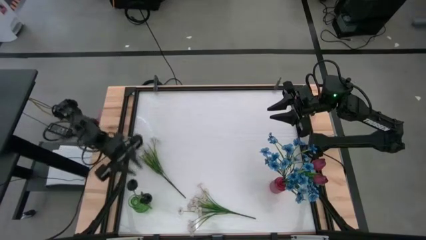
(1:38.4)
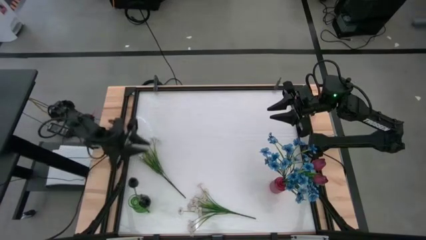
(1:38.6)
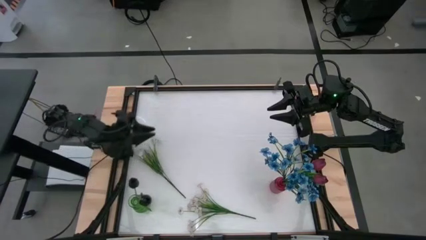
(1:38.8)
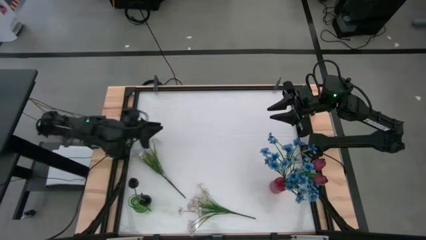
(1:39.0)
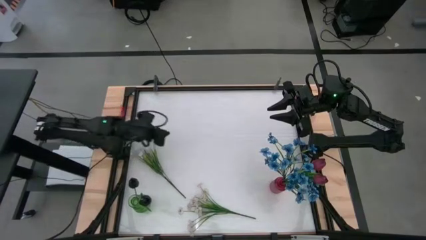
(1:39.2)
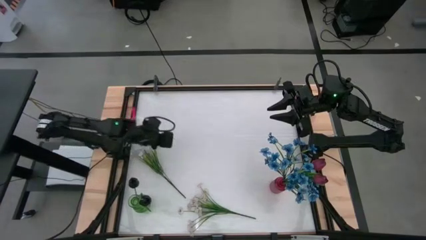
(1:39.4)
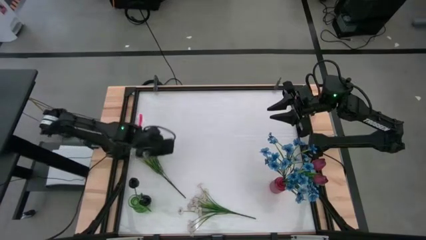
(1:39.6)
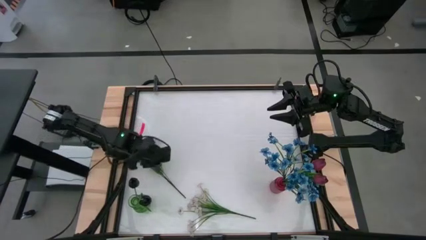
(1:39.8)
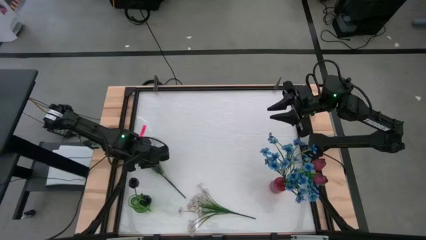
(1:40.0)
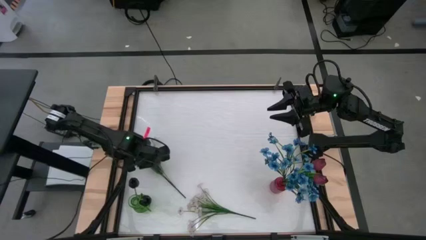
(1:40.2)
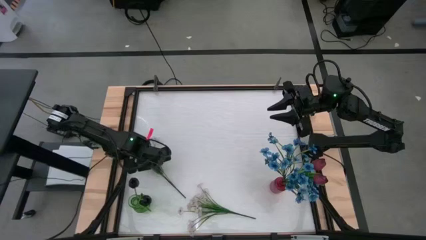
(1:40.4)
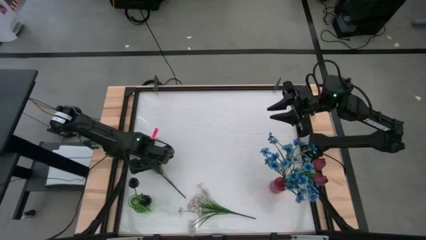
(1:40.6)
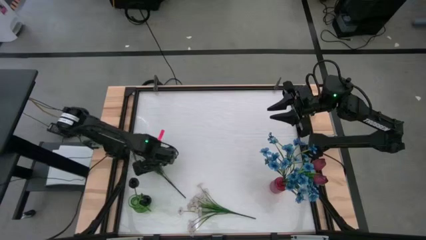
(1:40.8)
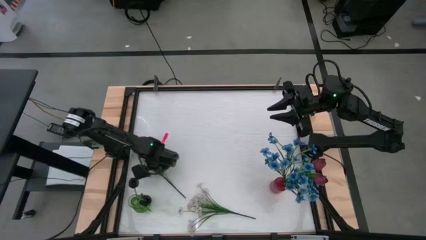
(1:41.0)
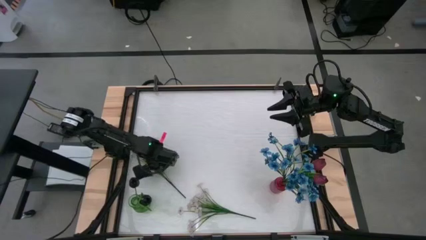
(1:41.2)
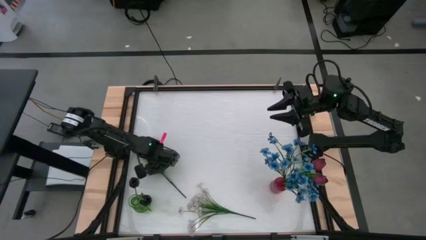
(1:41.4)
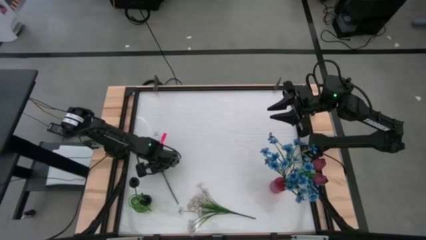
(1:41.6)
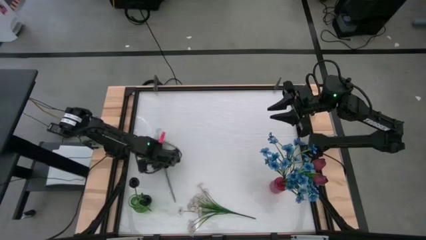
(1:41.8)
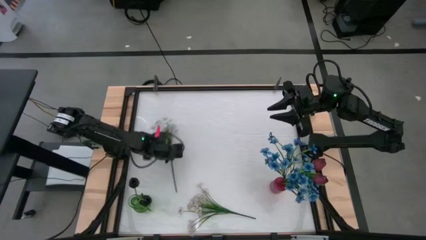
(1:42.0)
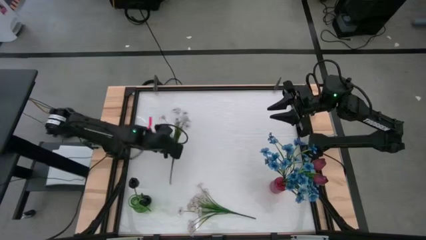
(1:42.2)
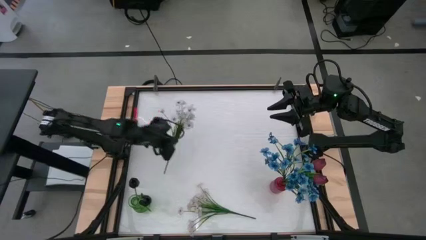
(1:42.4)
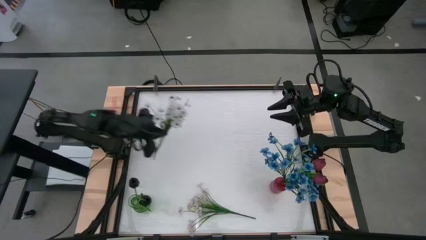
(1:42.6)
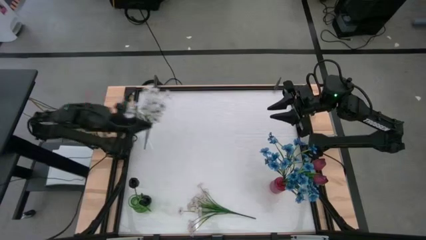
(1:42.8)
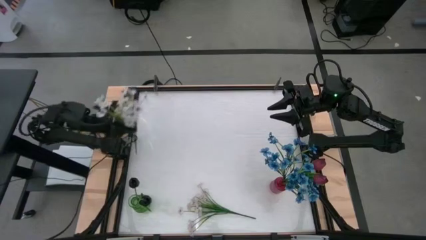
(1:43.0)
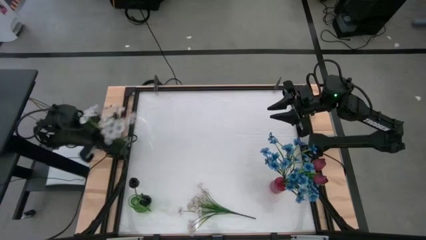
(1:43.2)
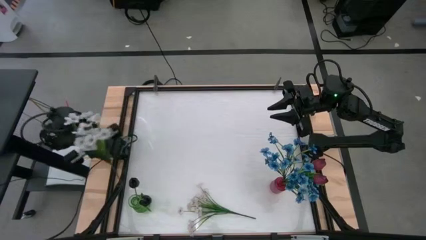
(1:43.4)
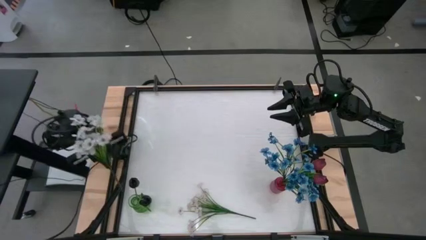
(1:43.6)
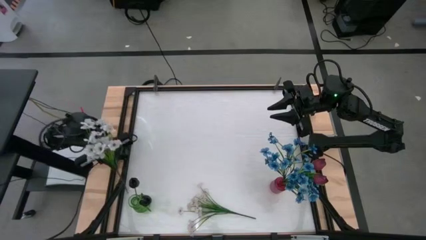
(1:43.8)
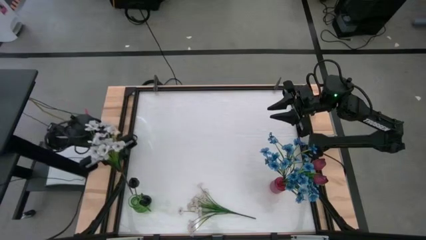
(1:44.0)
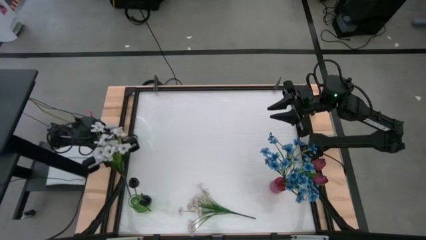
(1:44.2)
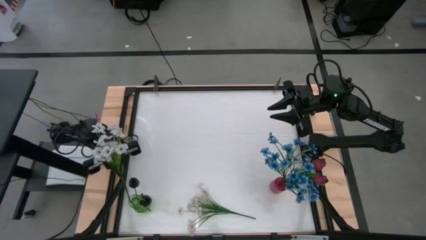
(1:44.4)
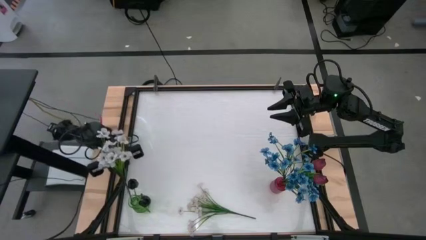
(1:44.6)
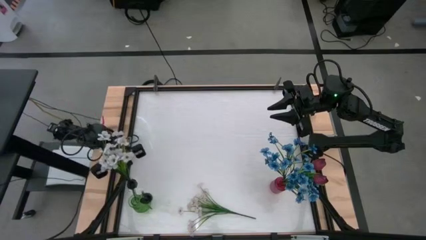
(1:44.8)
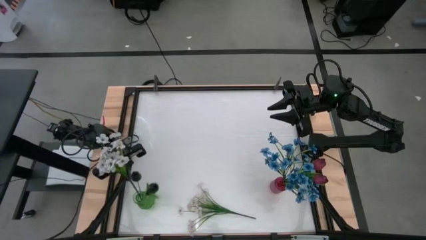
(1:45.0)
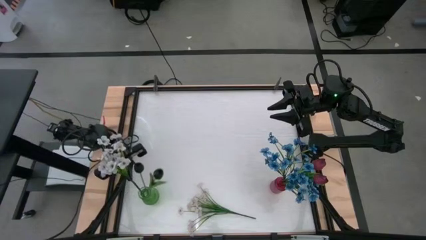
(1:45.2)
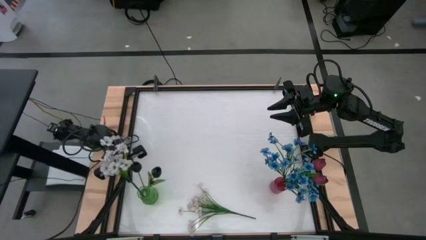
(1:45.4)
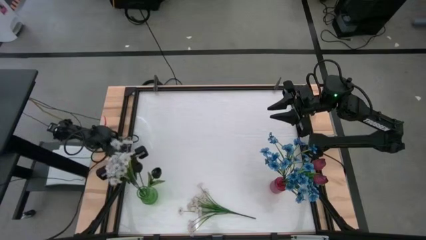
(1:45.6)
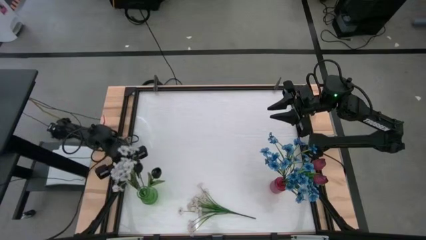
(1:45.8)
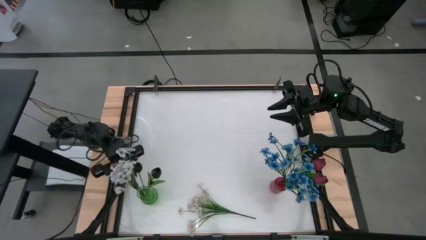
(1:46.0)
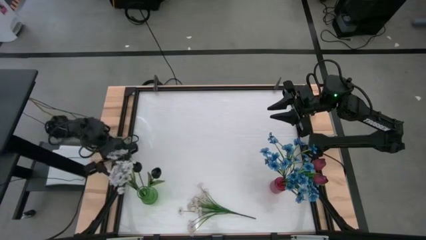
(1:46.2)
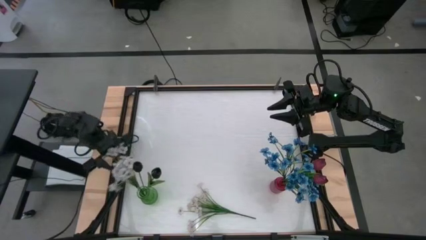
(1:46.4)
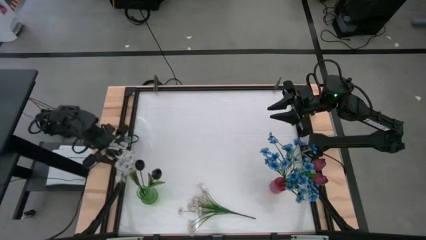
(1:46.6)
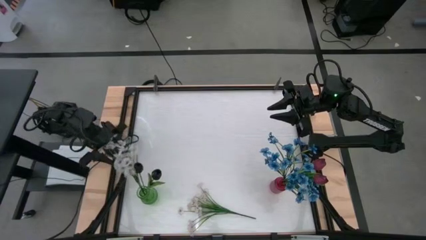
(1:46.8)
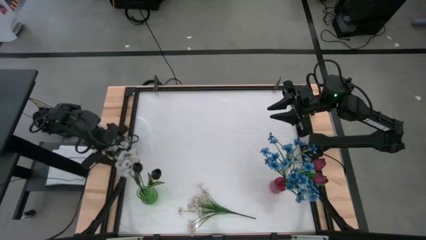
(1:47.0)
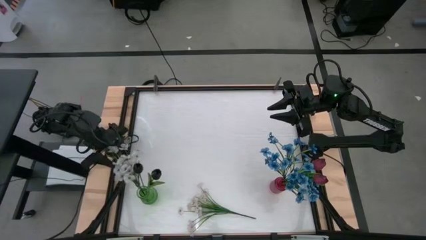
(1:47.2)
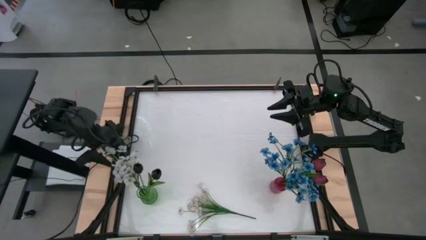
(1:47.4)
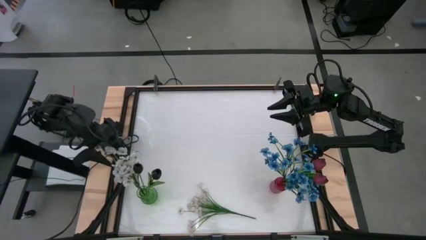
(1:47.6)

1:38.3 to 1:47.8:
Task: Sort flowers into vase by color
Put the left white flowers into the green flower vase

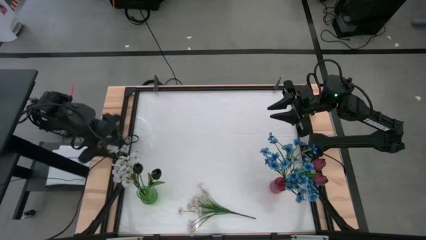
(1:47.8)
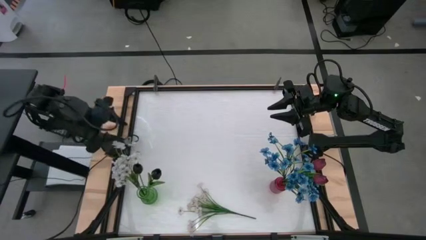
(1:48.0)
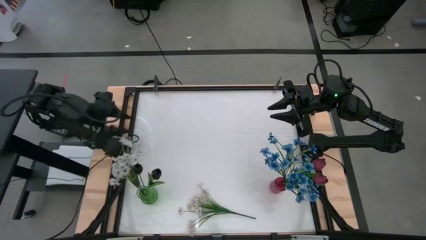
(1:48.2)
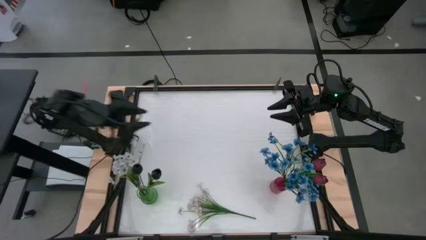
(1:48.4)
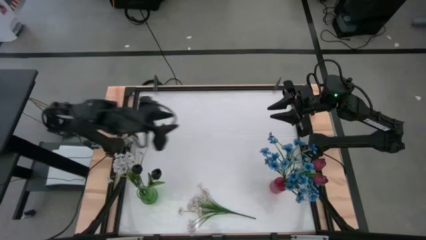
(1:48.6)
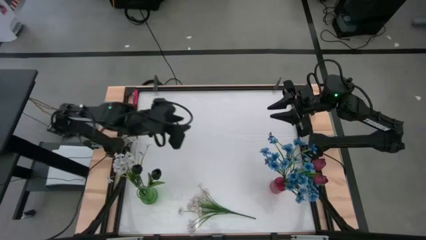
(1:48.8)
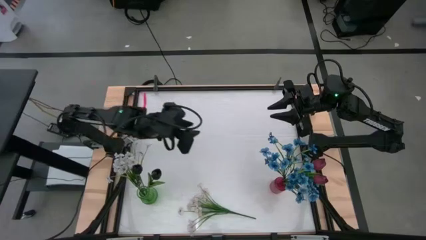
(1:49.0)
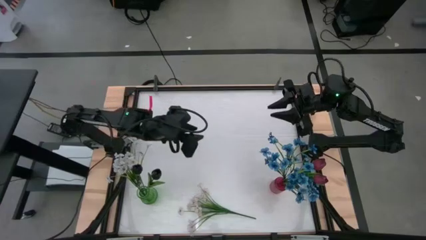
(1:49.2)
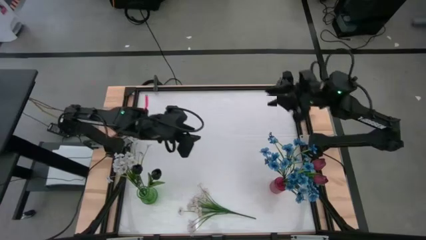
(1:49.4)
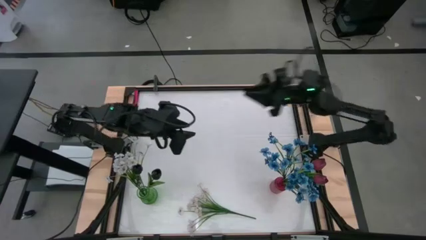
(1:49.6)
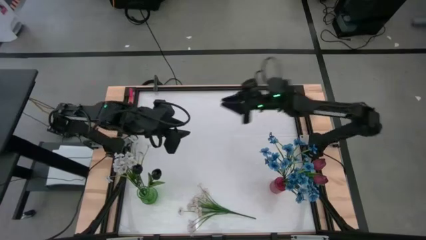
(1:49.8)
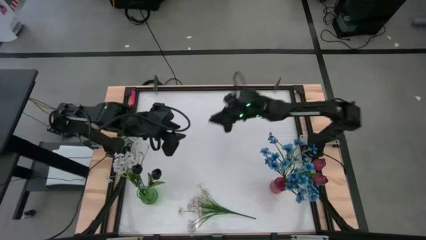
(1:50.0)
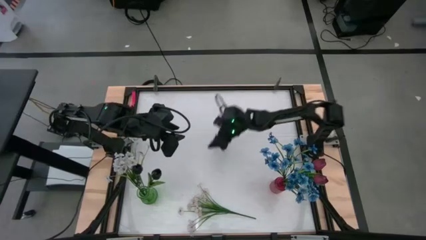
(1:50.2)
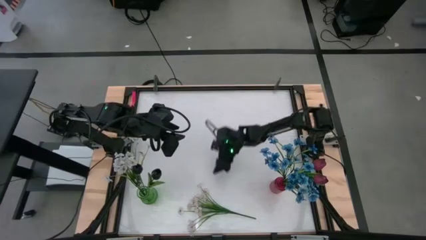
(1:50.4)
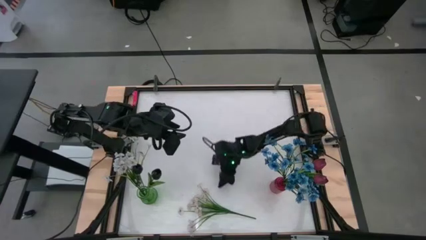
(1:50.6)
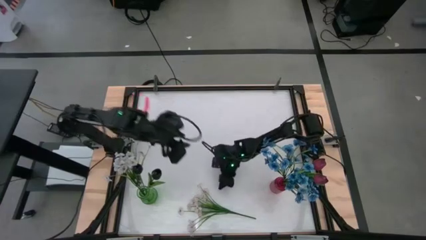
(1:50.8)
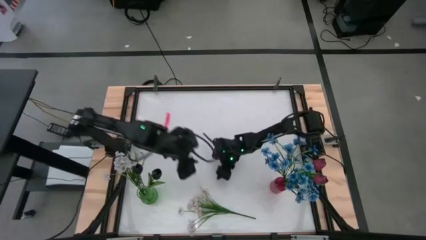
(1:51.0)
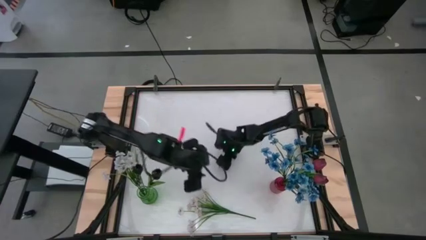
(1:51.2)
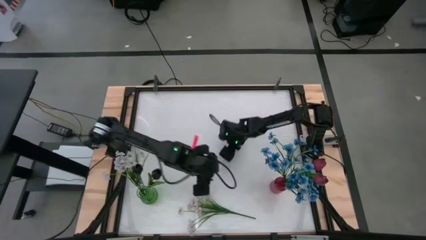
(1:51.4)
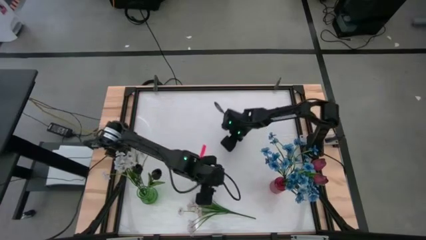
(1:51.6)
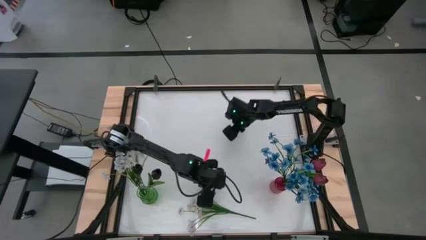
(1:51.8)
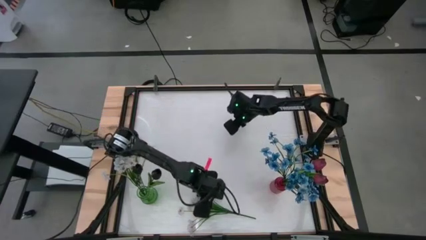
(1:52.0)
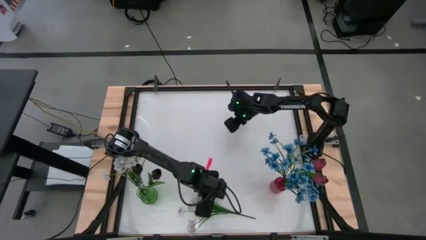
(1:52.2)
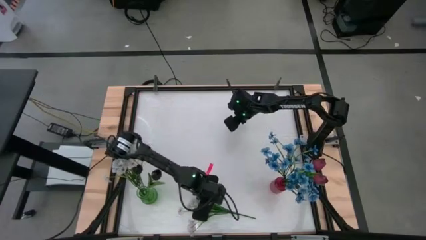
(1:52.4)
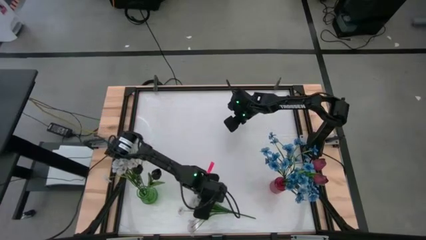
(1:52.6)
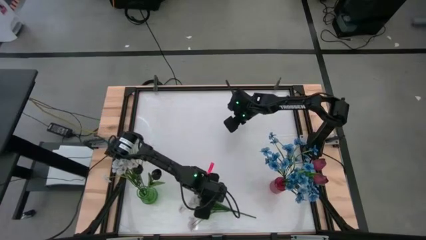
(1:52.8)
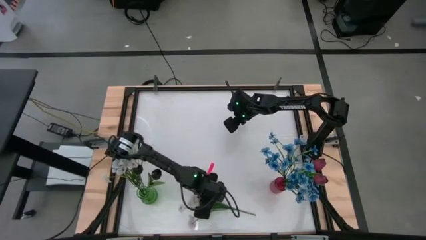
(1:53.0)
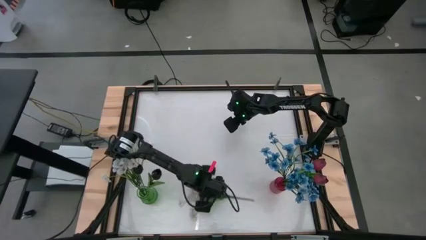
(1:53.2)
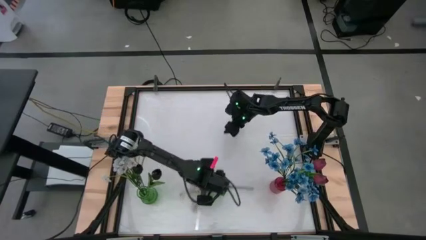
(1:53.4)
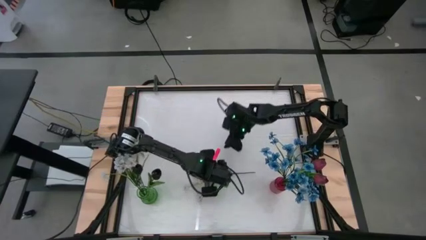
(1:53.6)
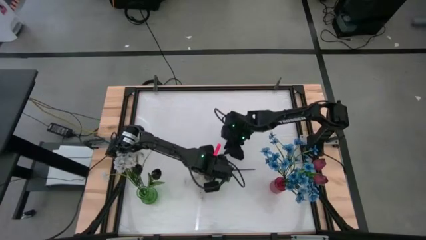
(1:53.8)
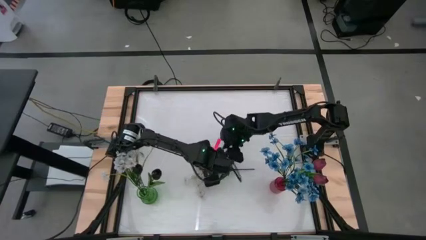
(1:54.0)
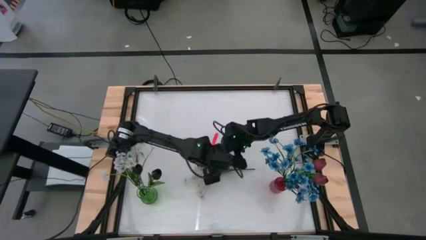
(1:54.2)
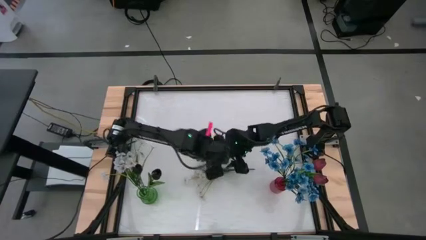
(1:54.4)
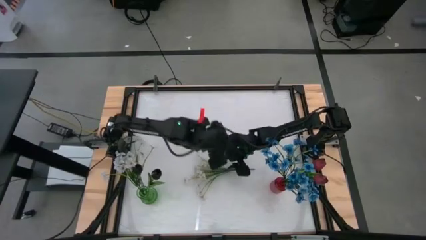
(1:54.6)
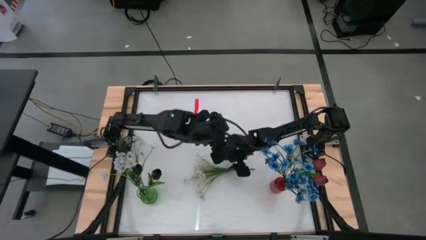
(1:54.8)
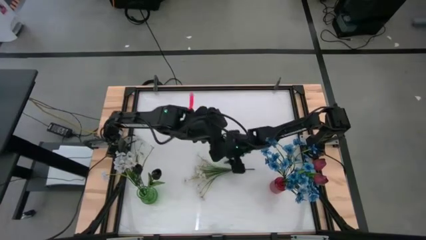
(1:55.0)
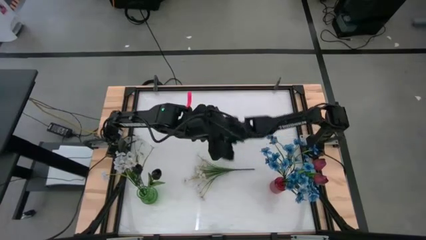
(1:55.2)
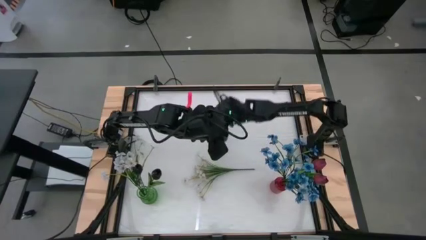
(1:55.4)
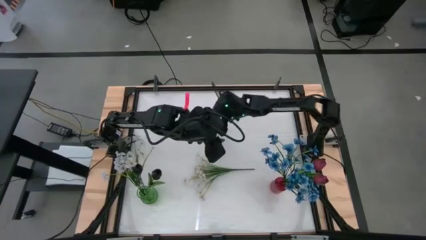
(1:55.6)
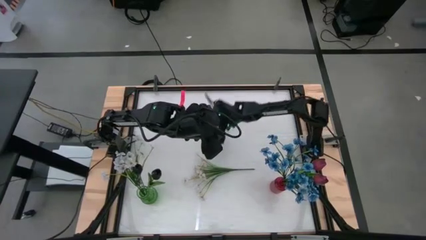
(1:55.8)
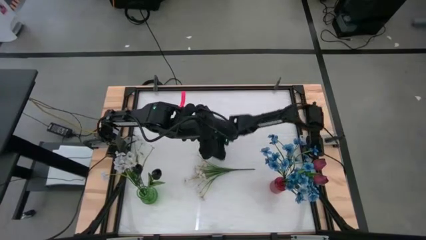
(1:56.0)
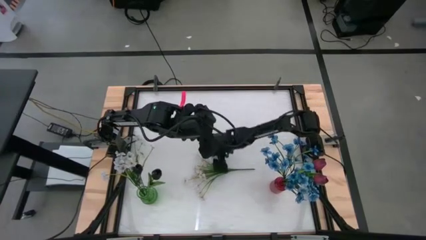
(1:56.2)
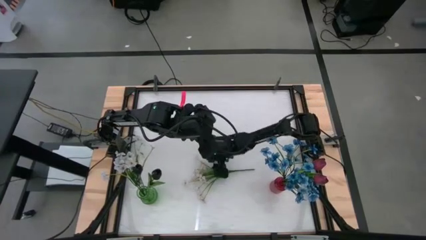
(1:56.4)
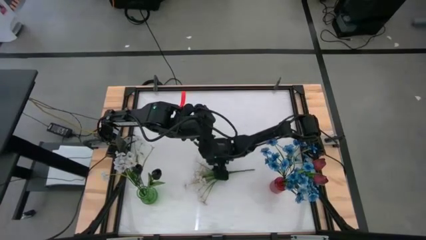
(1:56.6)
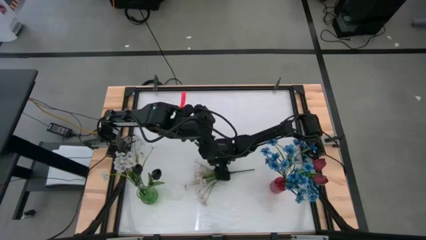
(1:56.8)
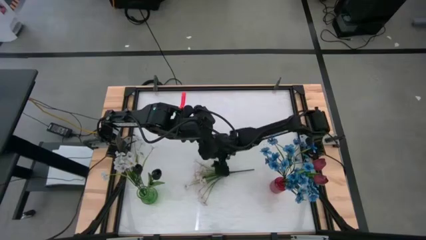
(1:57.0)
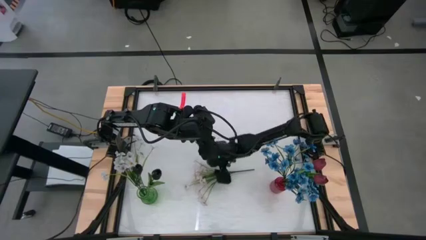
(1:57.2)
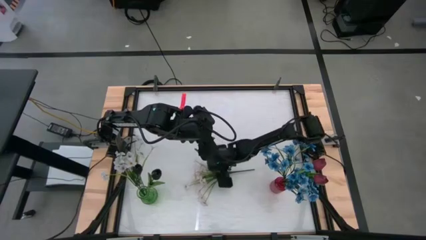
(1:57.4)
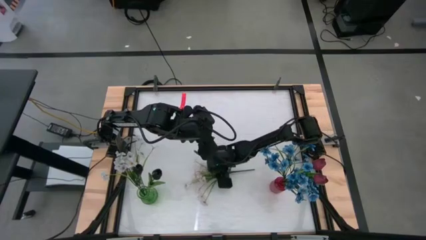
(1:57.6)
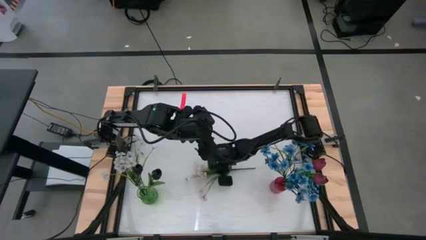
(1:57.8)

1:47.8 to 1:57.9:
Put the white flowers into the green flower vase
